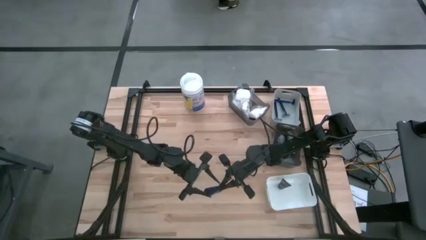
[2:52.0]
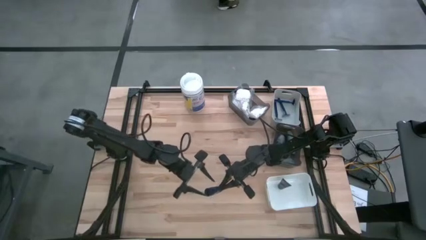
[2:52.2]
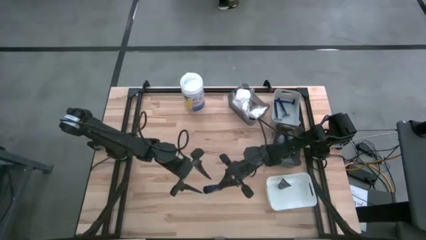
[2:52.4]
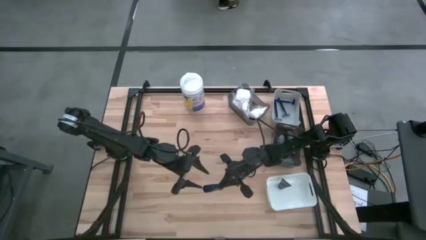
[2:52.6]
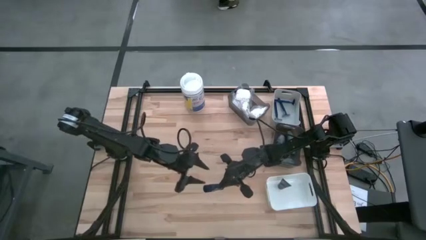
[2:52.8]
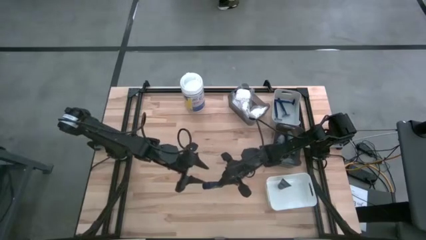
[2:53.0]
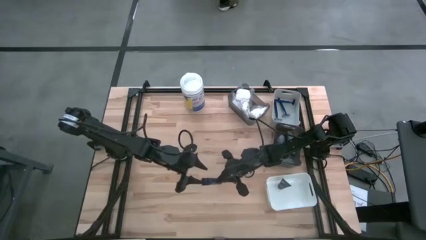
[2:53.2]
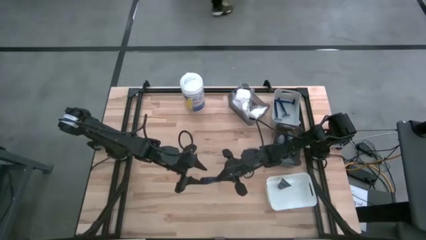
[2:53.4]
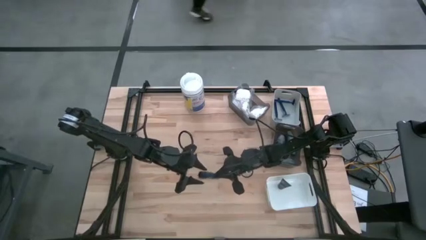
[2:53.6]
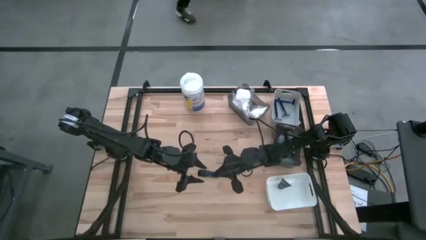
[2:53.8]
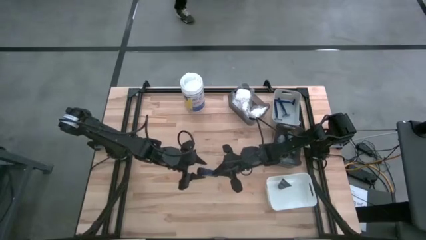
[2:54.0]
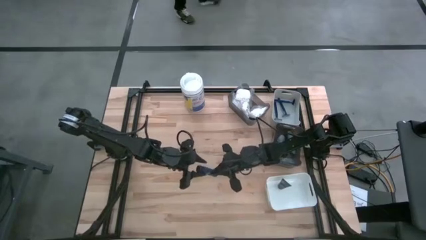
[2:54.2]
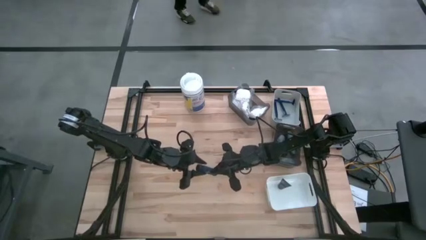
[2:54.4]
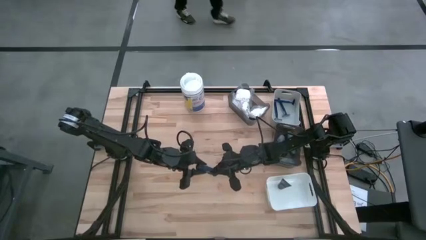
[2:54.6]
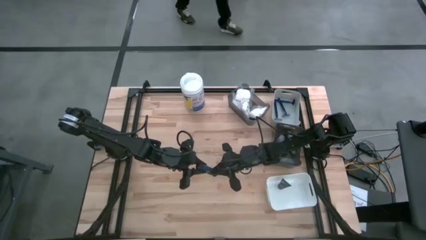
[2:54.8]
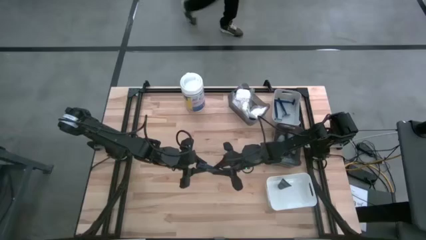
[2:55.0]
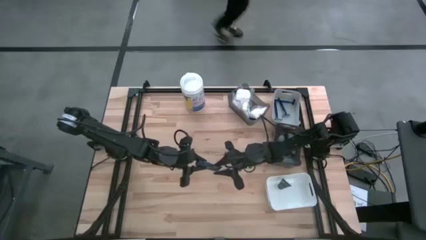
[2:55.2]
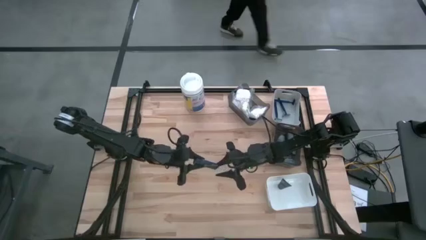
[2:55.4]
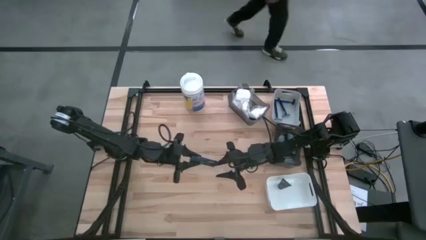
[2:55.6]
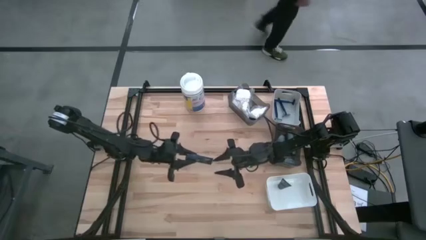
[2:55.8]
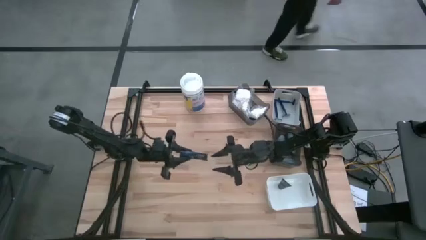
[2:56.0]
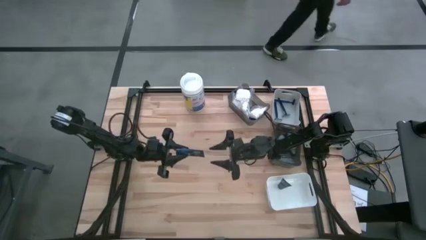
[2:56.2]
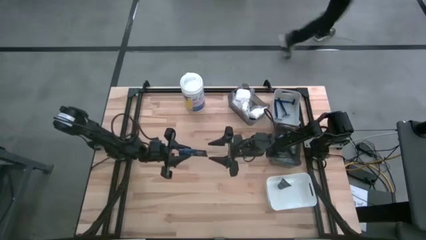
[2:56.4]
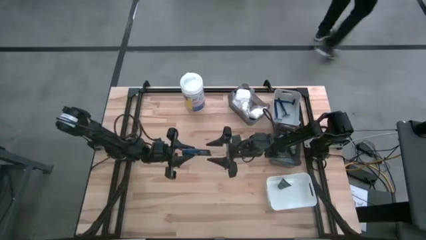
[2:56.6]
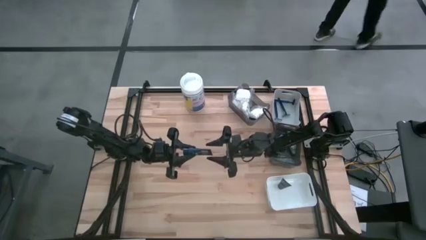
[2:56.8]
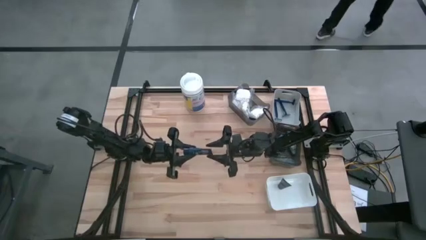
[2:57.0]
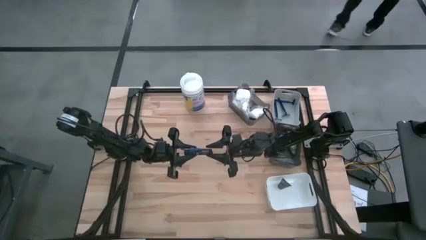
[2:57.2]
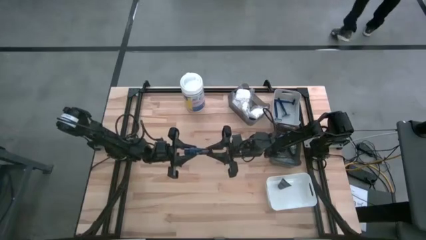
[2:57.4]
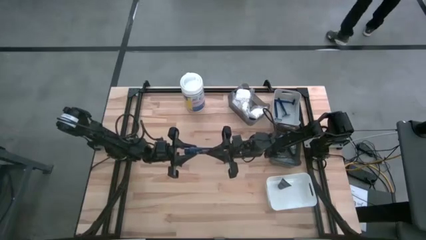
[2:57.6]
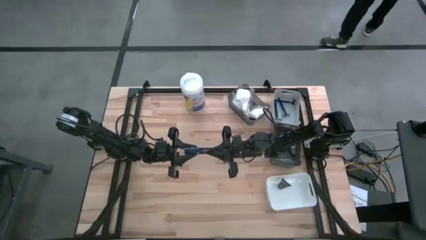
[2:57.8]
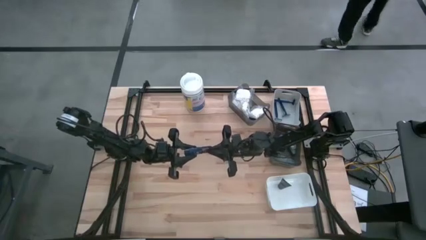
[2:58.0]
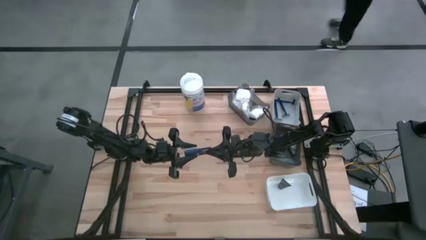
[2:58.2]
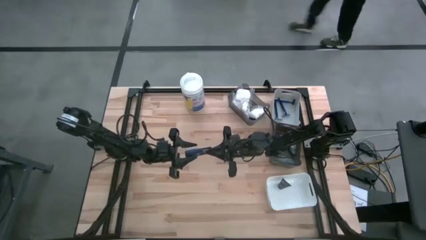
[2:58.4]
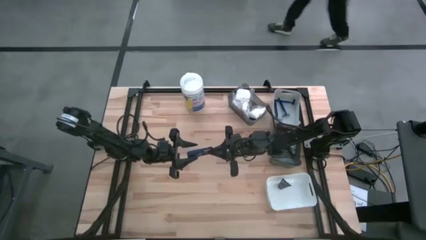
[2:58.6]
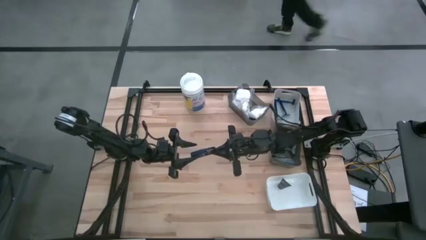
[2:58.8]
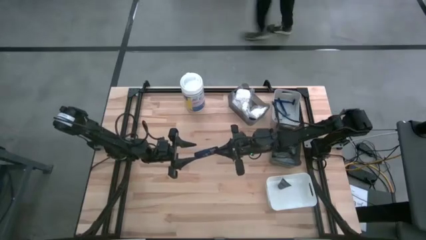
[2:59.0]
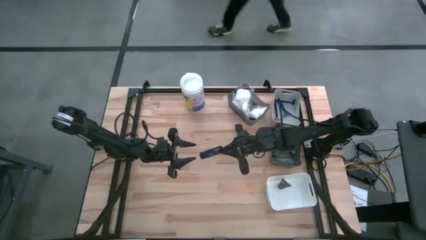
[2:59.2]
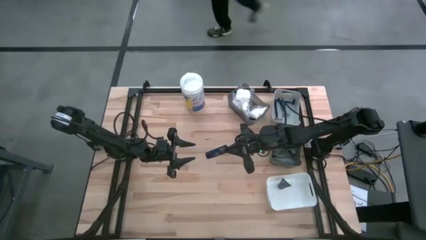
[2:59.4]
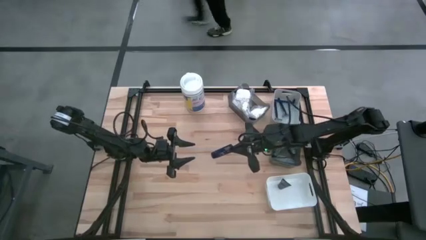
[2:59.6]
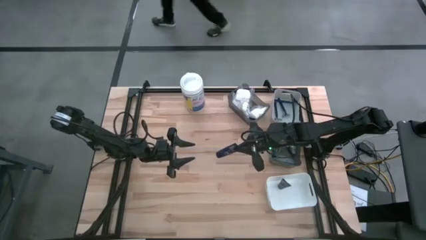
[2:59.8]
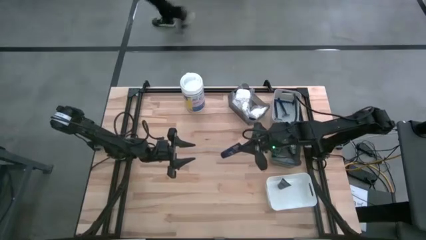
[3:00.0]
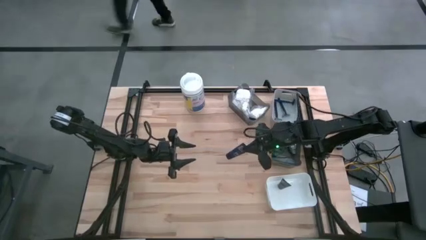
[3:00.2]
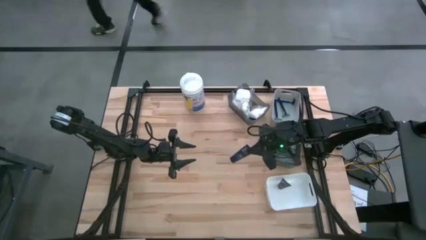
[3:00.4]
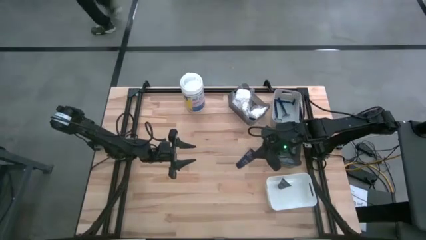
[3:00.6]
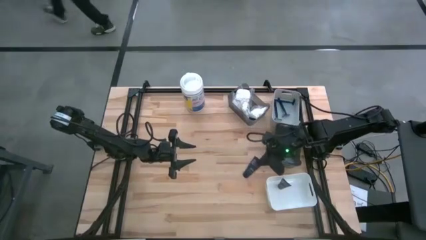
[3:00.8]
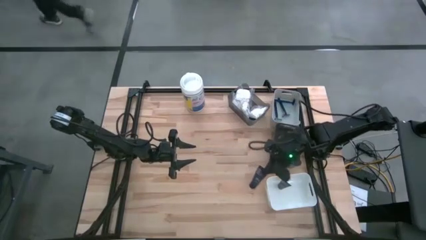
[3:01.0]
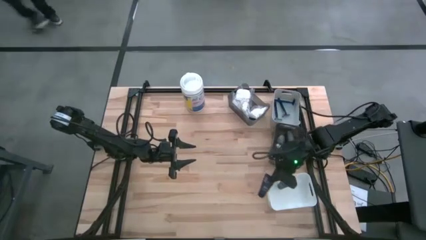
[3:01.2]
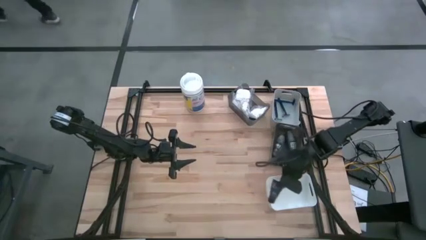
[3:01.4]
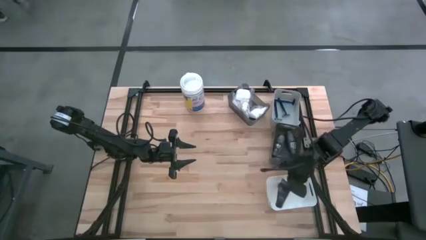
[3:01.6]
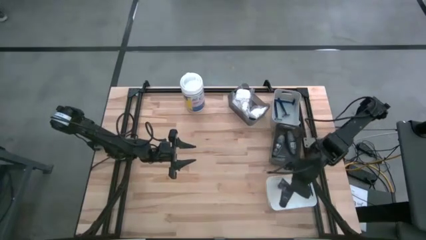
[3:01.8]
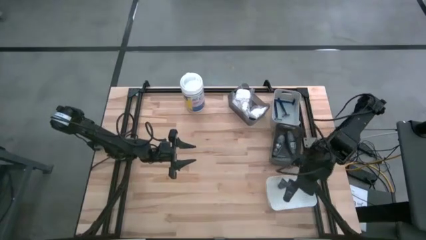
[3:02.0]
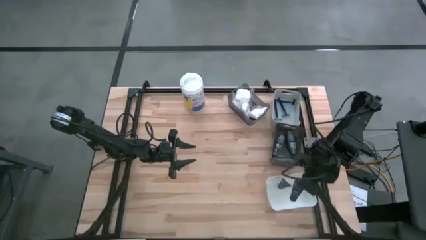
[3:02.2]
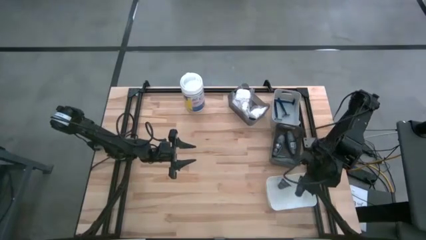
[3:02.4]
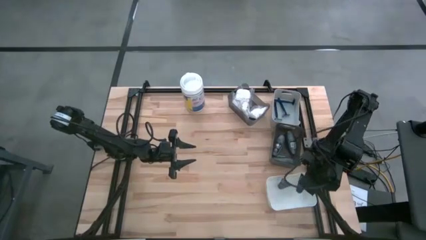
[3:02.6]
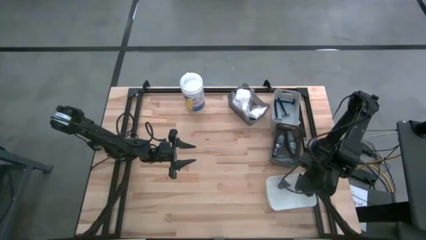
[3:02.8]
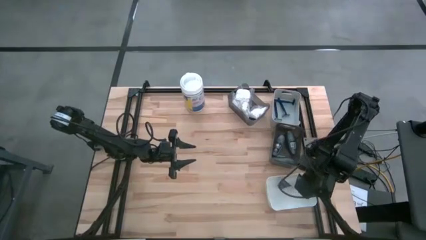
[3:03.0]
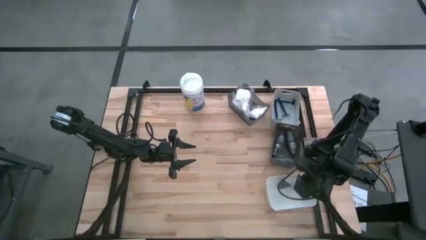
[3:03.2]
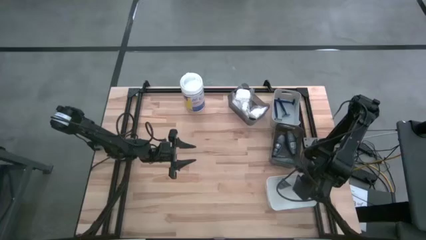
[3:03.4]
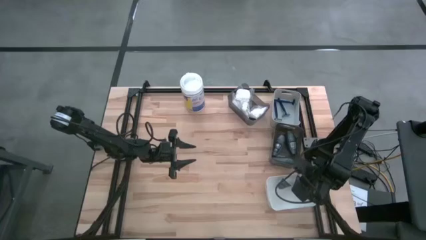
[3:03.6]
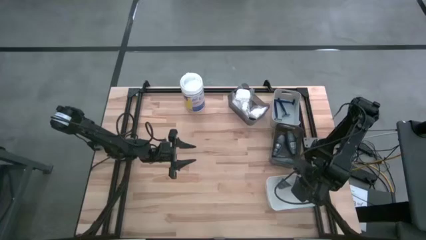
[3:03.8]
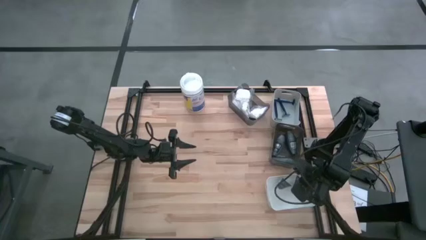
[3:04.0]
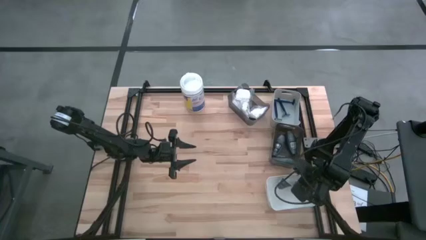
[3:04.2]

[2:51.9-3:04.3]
Task: Pick & Place Travel size toiletries
Put the blue shave cream into the white bin

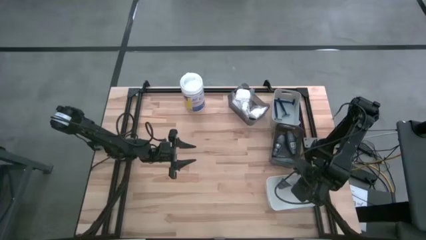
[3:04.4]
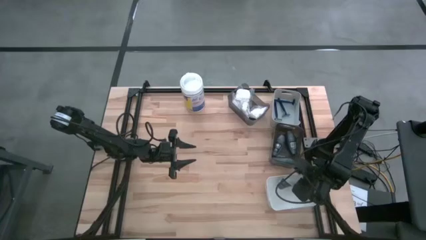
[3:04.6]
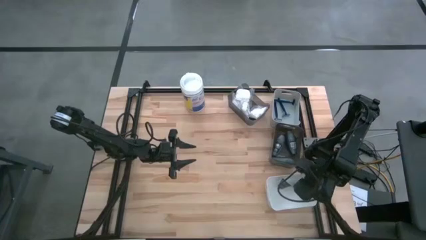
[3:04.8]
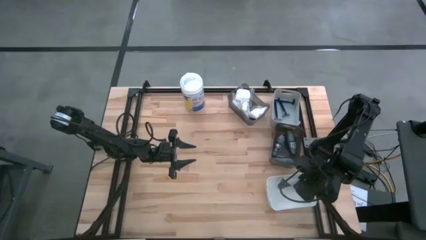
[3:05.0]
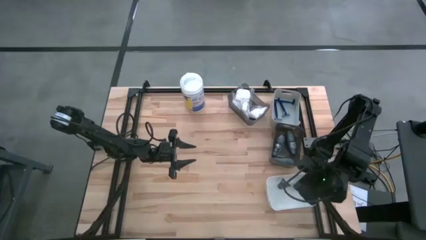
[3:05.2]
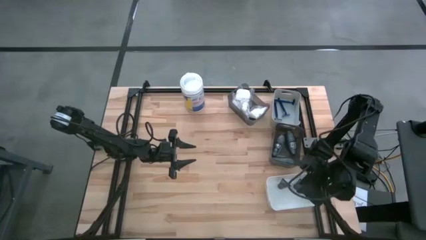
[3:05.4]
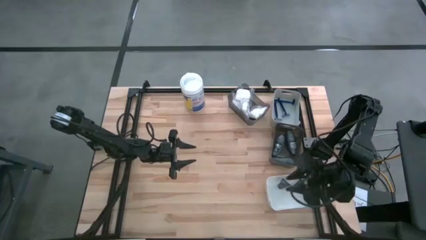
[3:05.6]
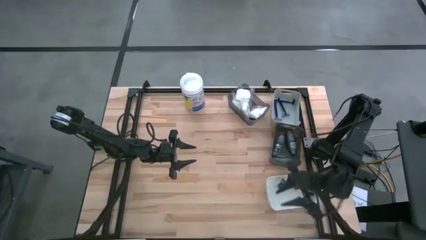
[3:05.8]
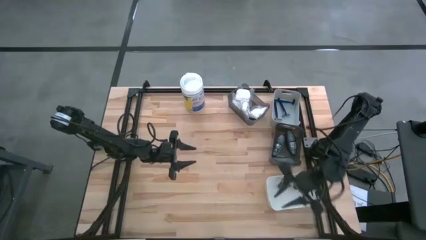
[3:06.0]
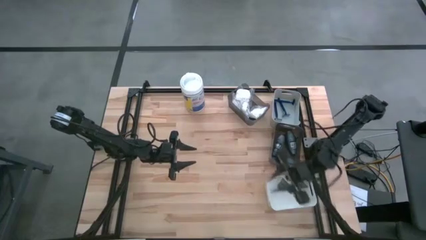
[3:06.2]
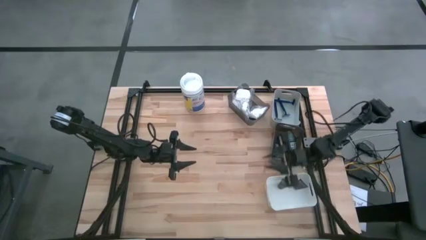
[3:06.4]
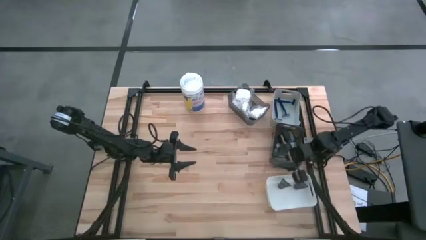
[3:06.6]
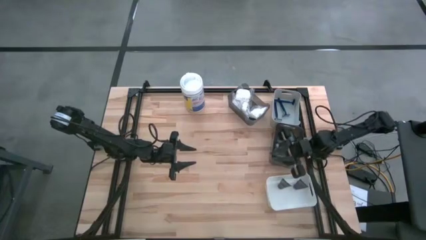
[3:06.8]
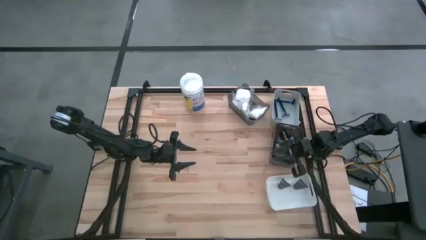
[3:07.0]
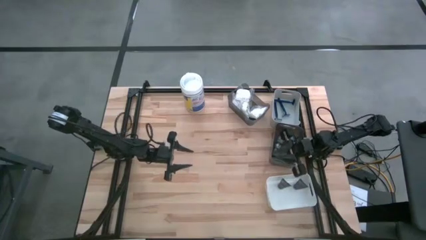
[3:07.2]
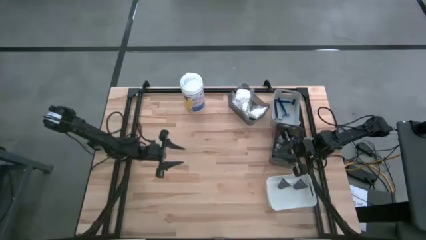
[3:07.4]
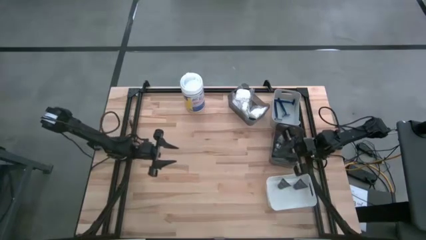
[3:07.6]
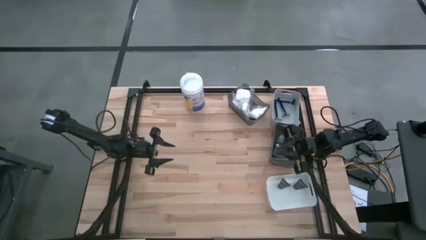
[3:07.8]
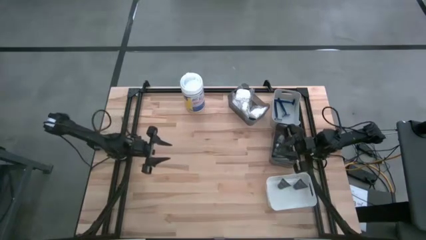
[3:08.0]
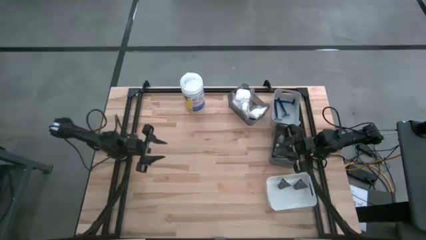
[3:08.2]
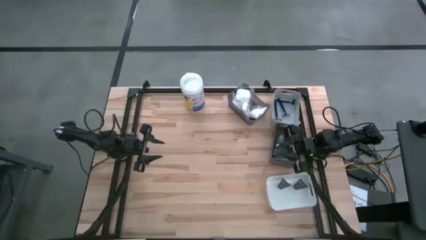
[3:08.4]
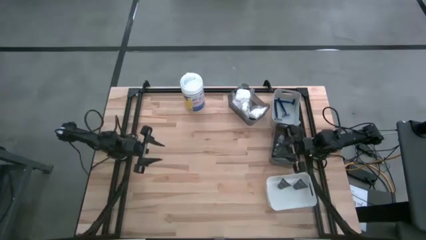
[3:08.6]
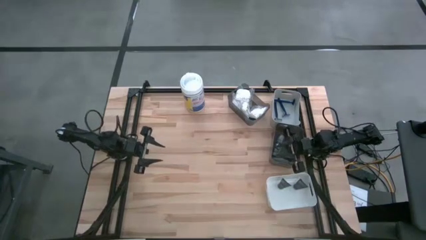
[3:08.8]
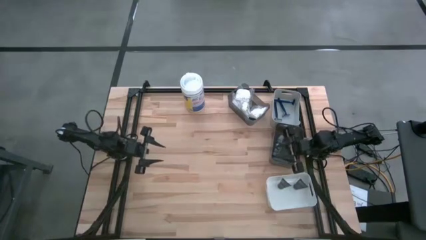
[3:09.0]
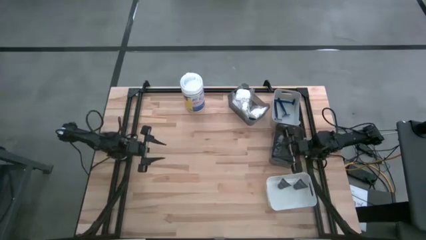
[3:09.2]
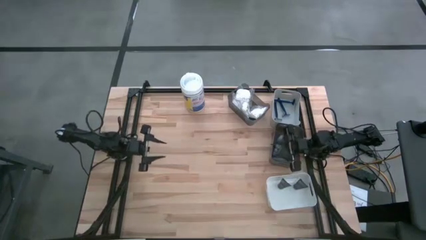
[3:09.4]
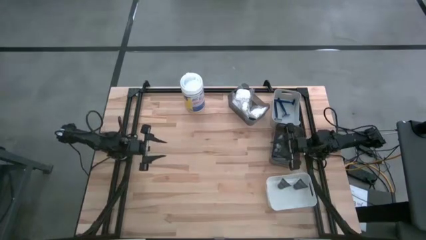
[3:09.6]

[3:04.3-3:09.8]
Return to Home Position
